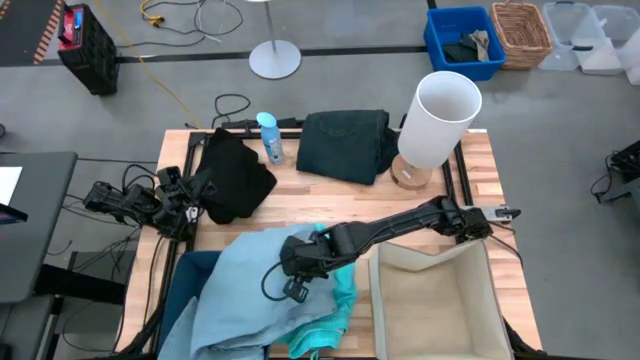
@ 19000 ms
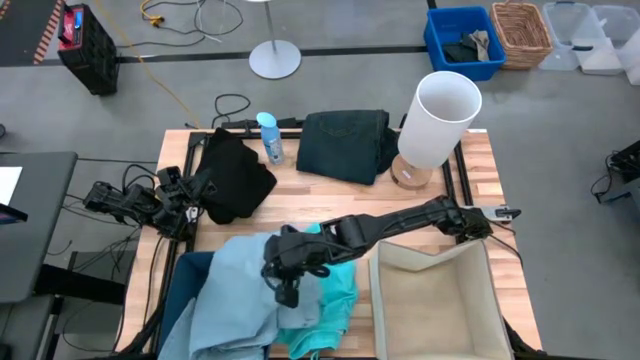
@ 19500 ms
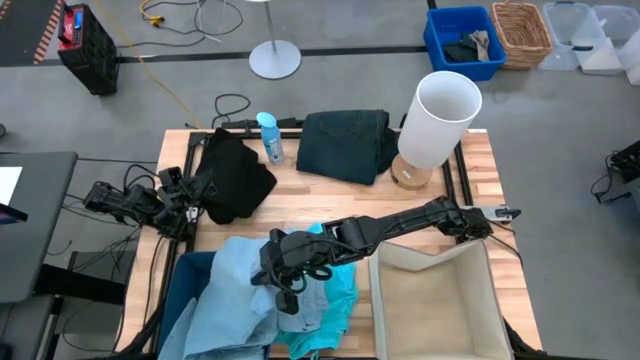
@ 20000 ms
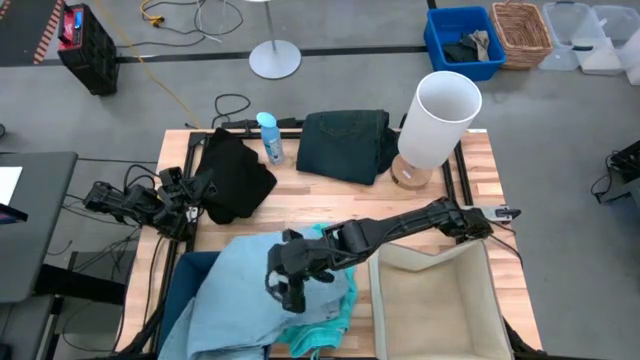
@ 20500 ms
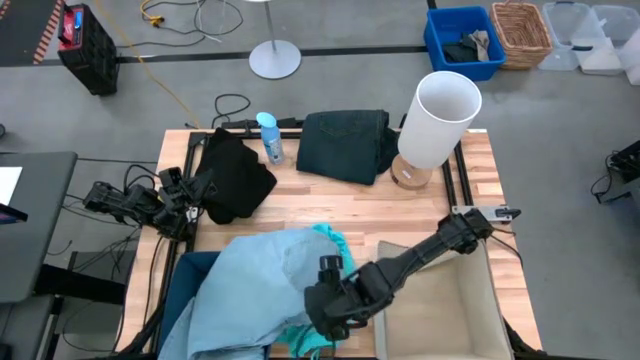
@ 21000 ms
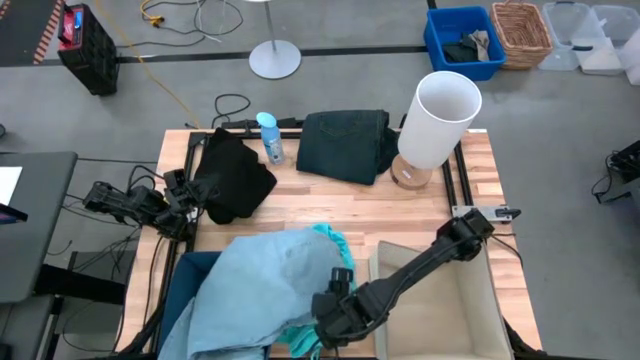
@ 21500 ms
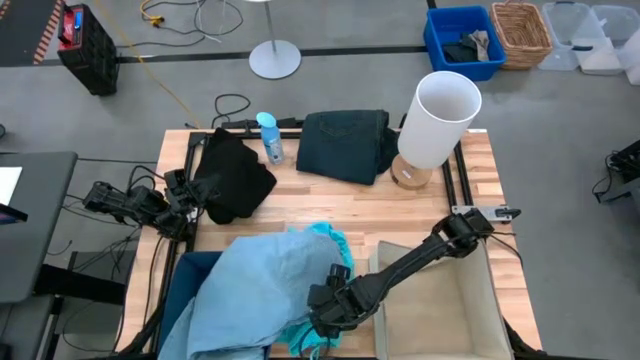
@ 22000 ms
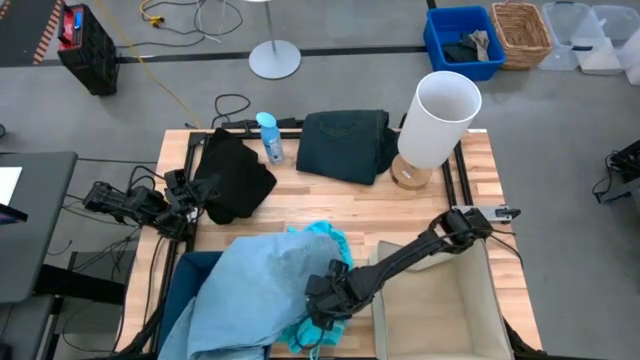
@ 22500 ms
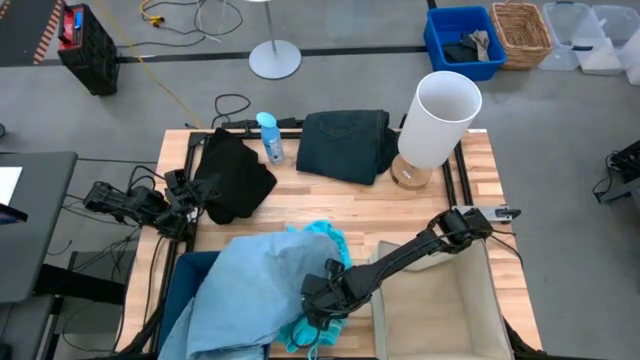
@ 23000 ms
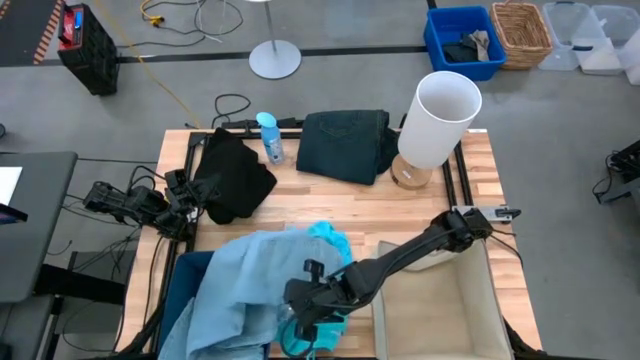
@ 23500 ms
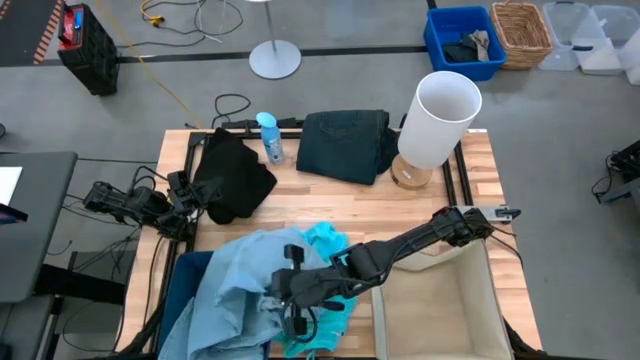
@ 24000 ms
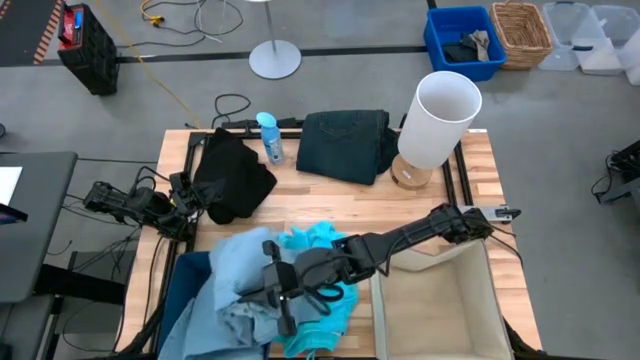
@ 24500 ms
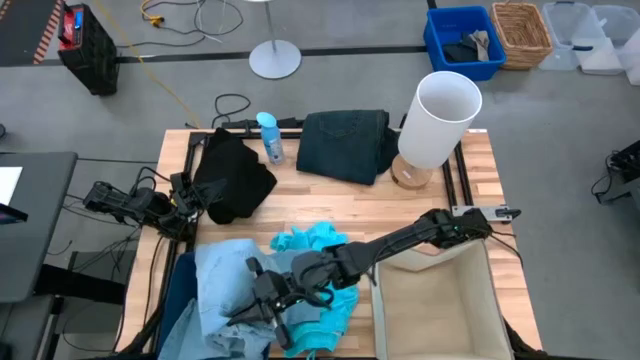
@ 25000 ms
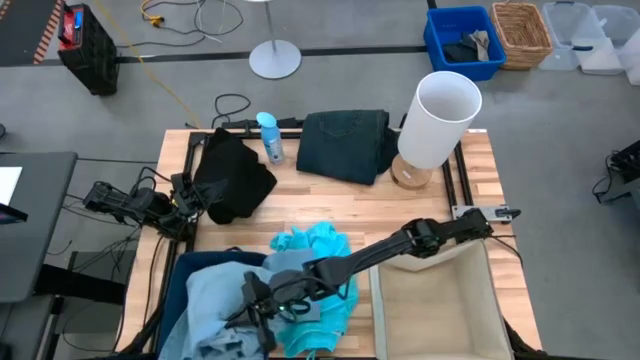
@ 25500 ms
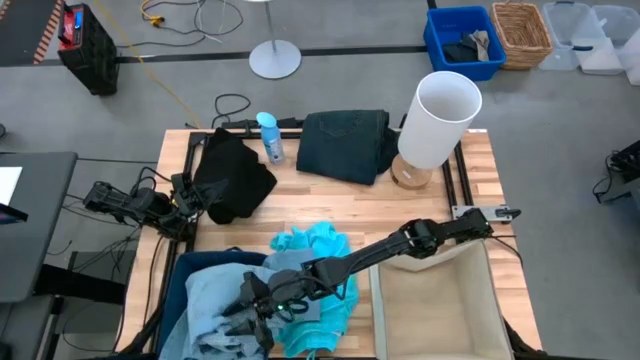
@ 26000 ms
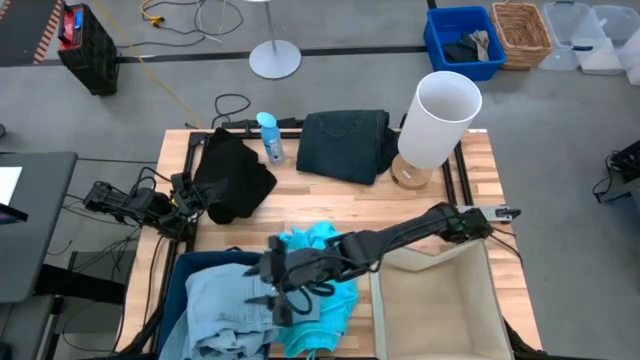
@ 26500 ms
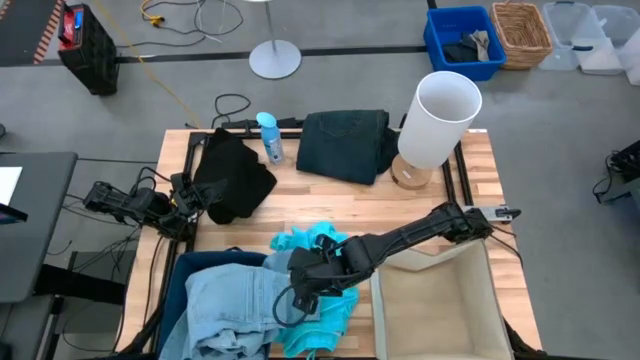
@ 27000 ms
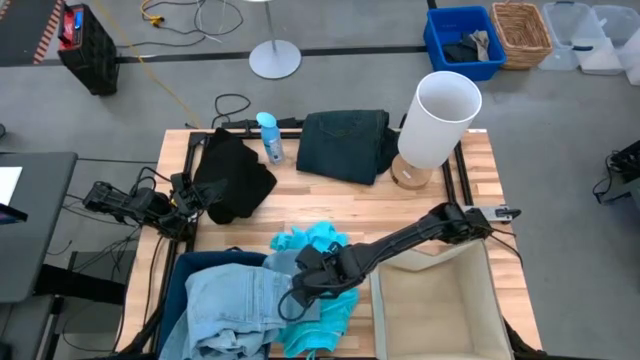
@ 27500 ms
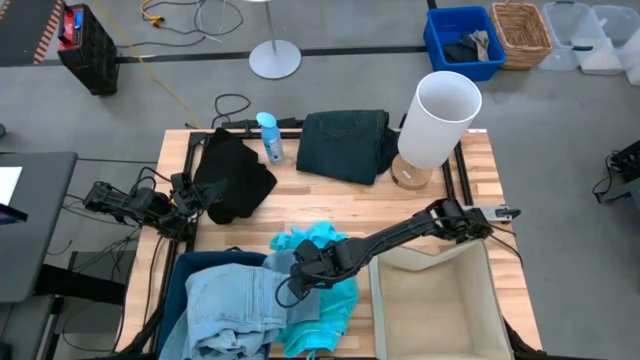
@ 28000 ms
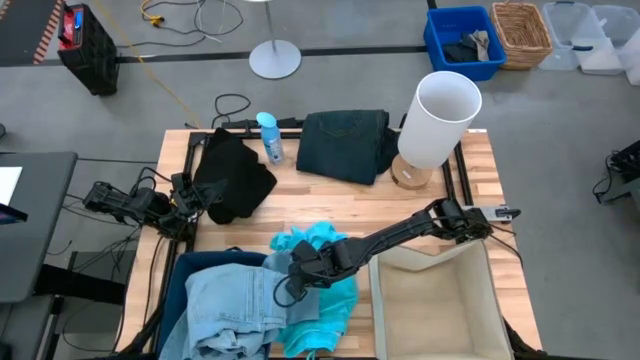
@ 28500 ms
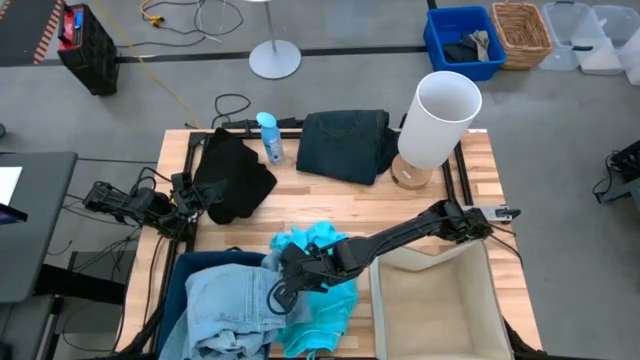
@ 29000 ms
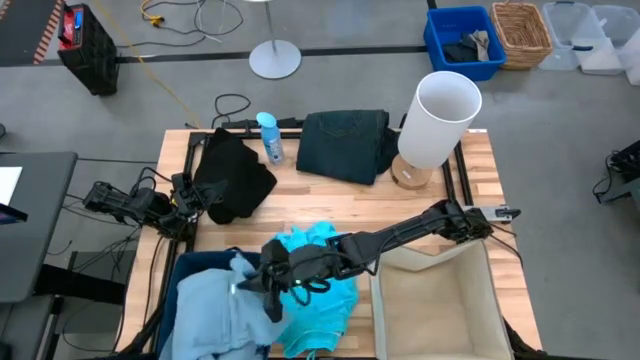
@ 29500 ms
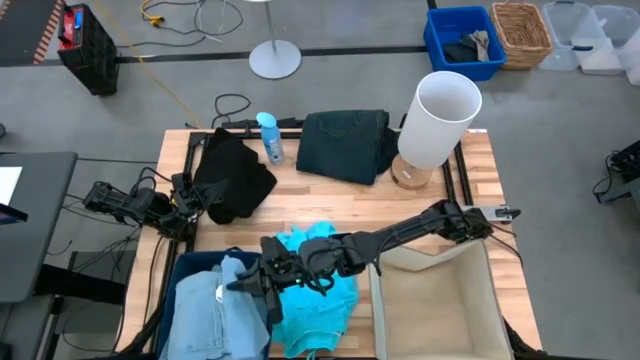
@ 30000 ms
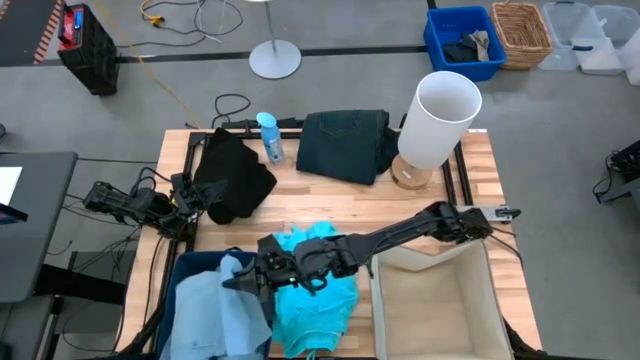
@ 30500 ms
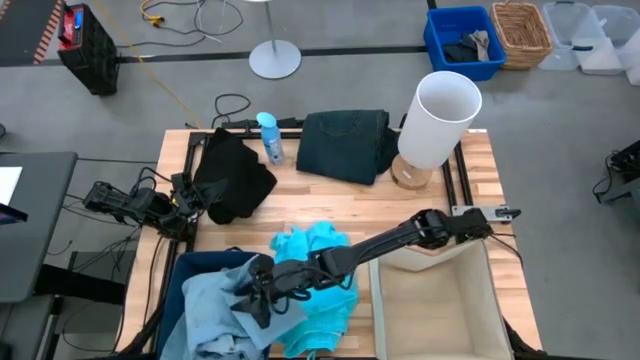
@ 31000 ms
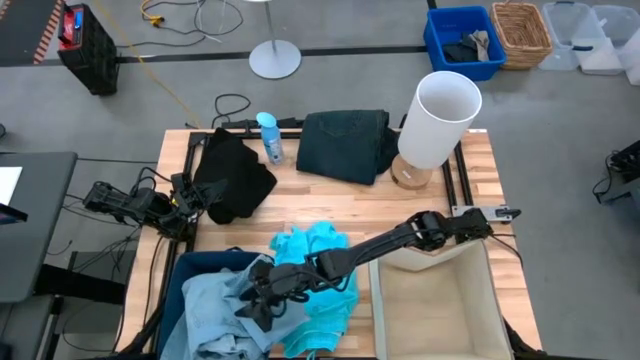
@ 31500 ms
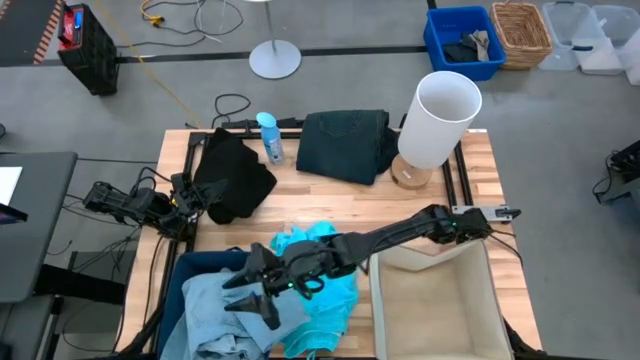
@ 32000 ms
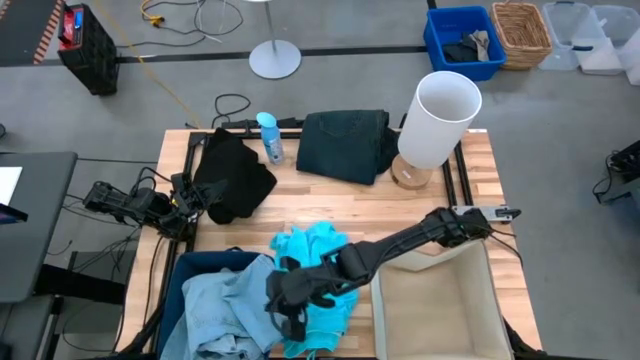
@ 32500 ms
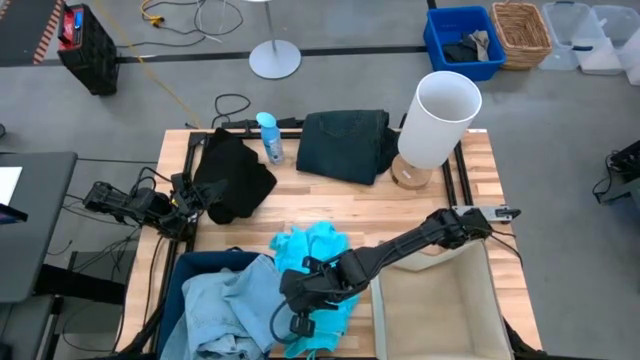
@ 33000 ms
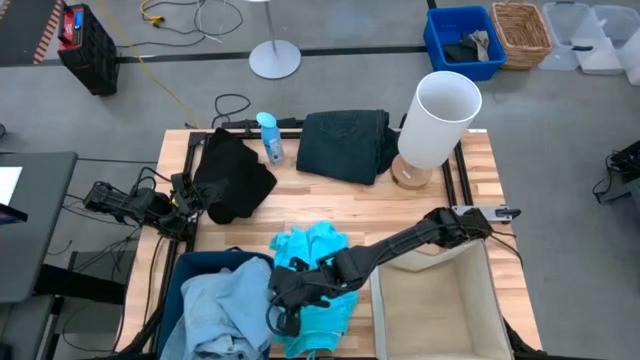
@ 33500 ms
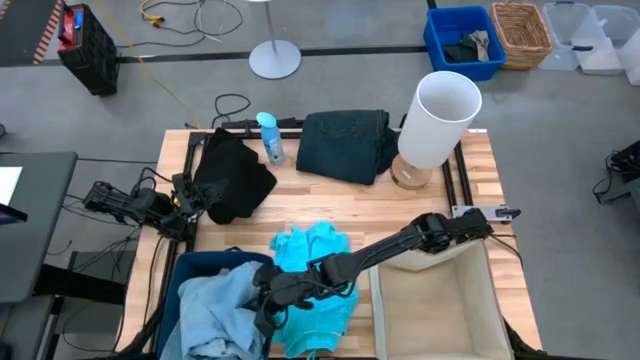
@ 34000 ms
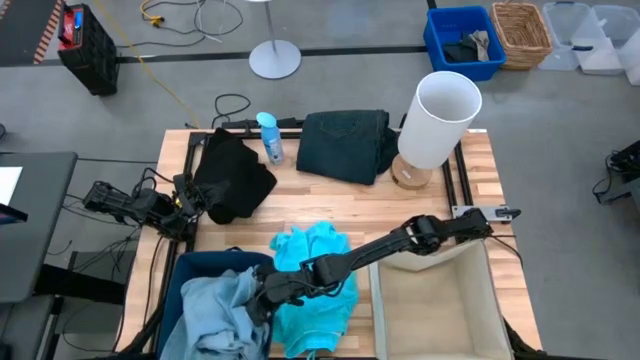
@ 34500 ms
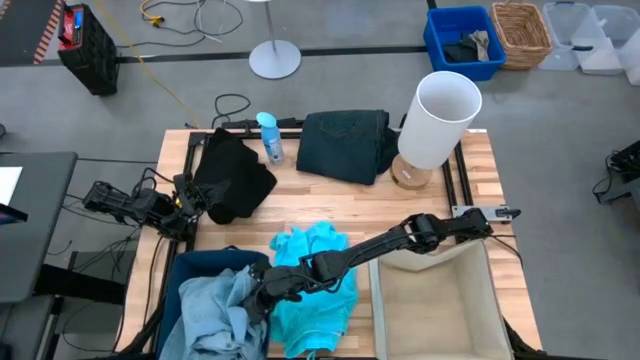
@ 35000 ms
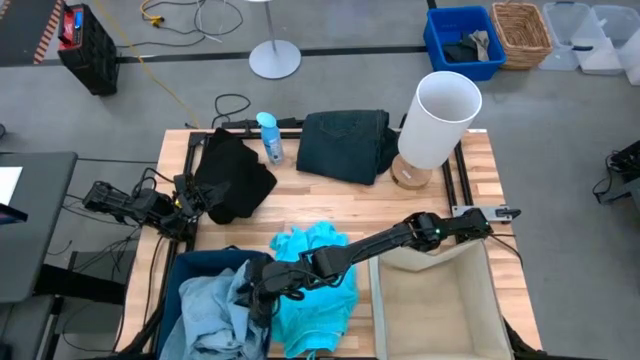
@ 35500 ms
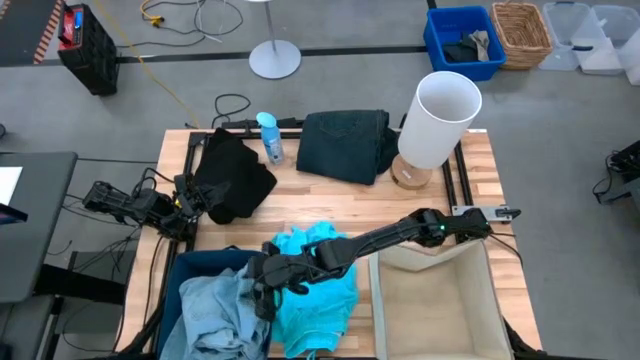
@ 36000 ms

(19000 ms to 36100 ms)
Task: Sort clothes
Put the light blue jeans into the blue laundry organizer

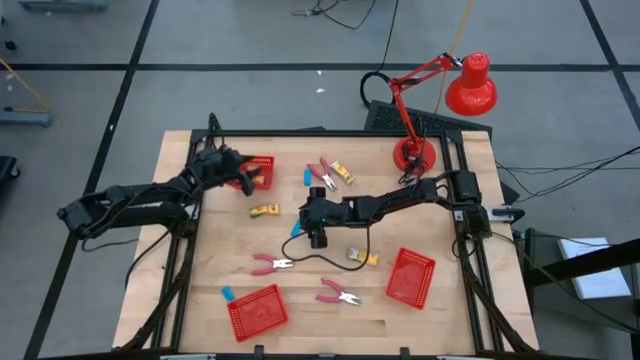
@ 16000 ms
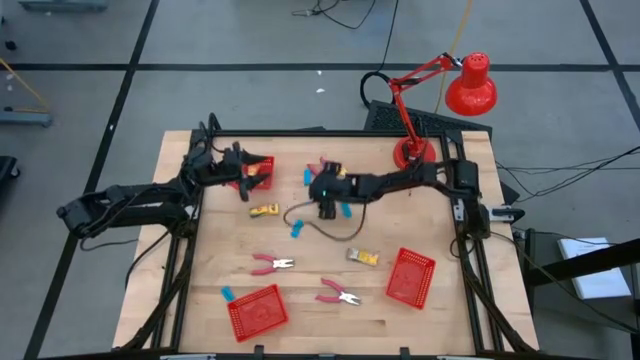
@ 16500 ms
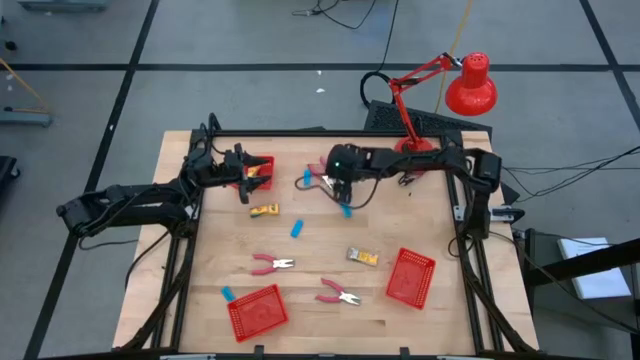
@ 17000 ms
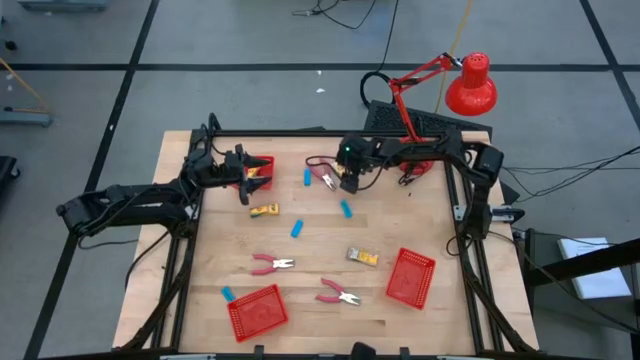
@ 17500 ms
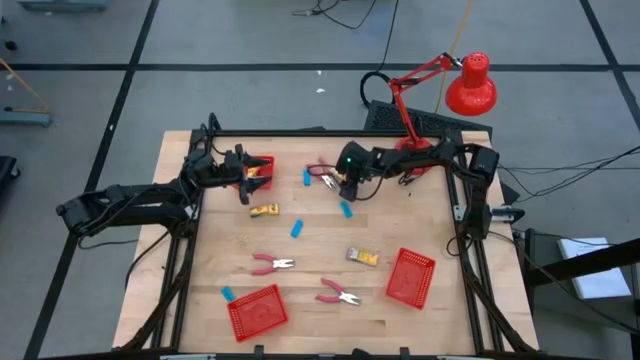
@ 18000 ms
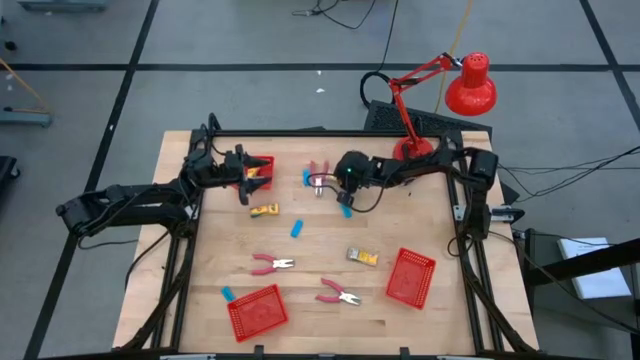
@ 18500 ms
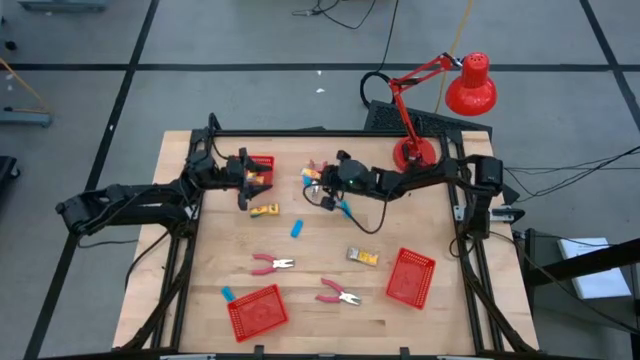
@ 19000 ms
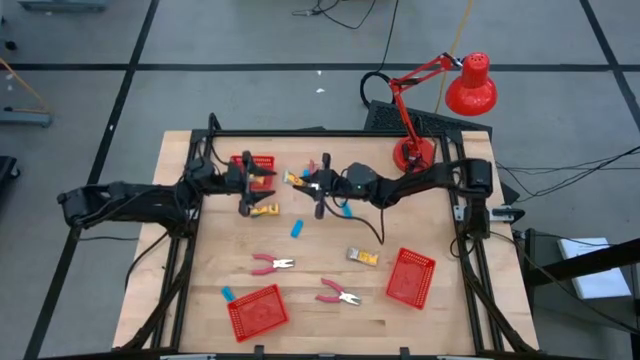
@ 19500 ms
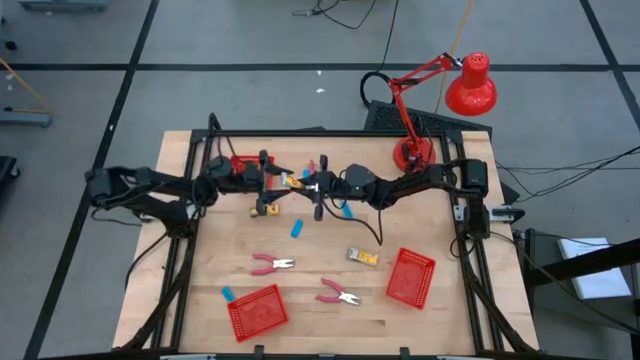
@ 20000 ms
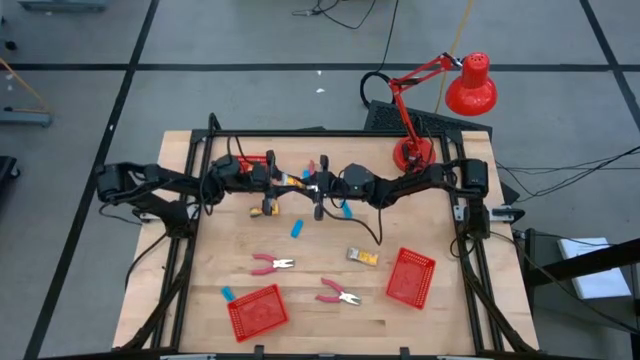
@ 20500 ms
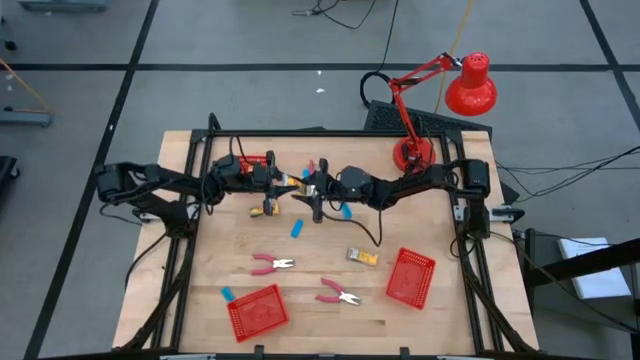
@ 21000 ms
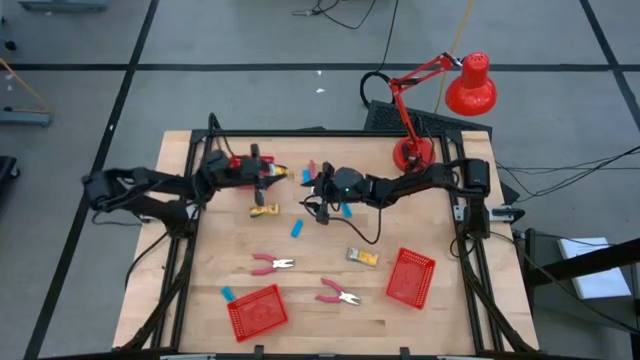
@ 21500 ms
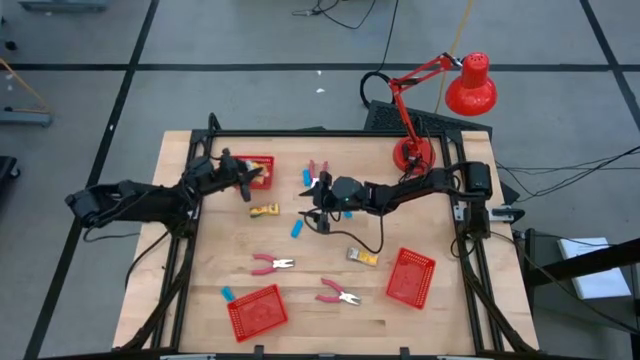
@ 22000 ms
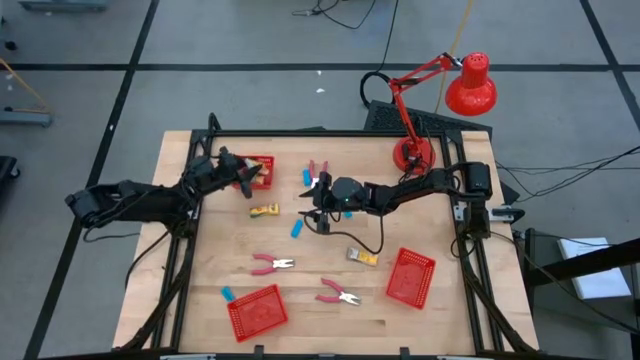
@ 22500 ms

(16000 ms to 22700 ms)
Task: Pick & Place School Supplies
Put the yellow crayon box into the top red basket
